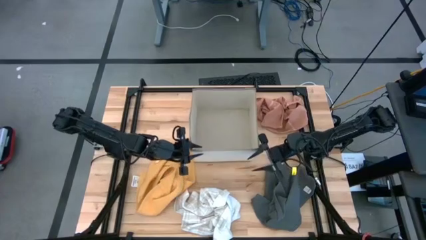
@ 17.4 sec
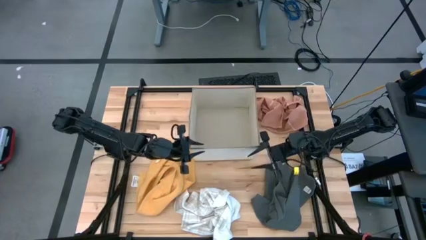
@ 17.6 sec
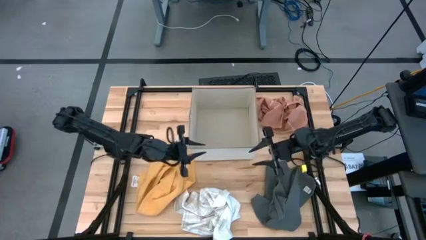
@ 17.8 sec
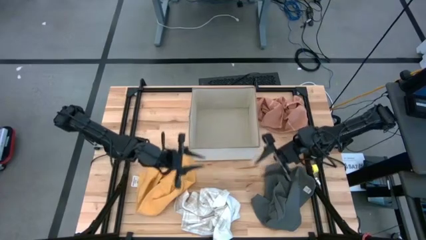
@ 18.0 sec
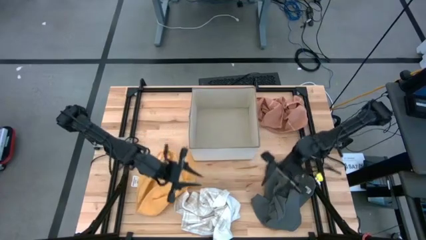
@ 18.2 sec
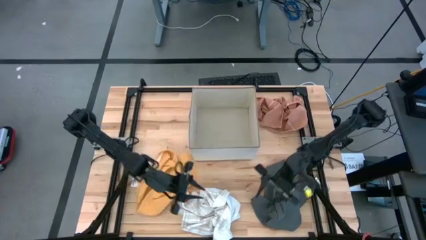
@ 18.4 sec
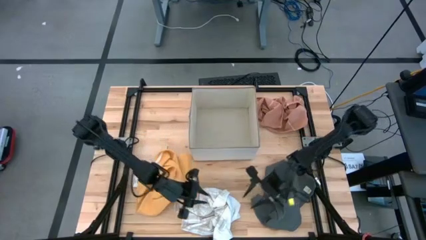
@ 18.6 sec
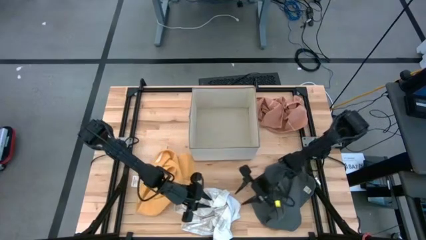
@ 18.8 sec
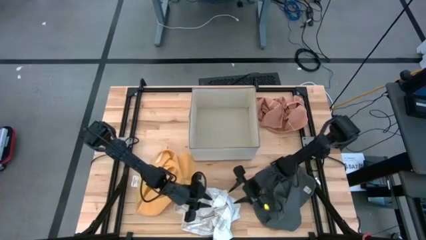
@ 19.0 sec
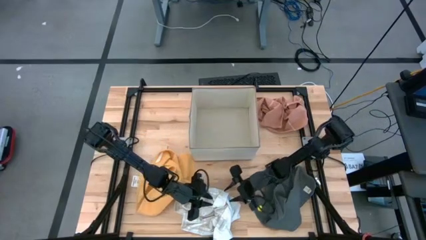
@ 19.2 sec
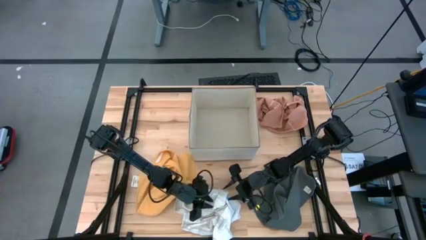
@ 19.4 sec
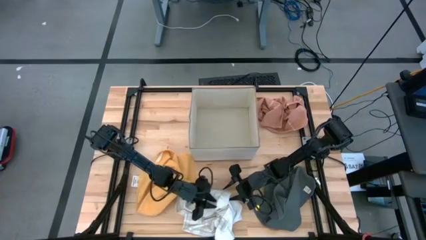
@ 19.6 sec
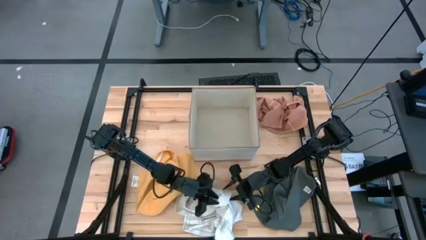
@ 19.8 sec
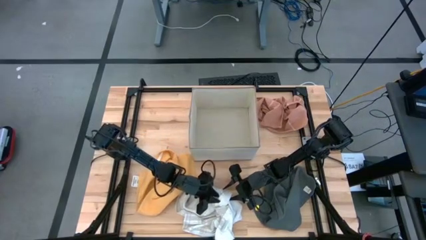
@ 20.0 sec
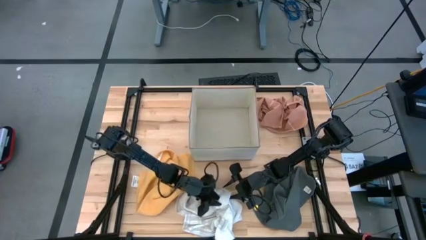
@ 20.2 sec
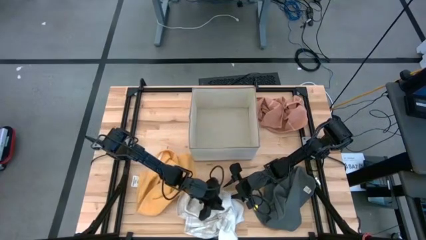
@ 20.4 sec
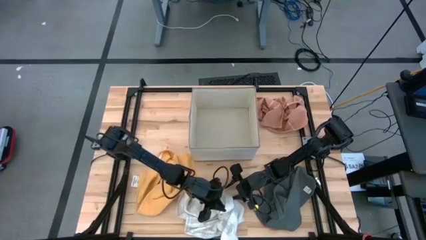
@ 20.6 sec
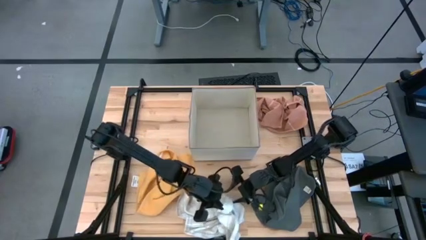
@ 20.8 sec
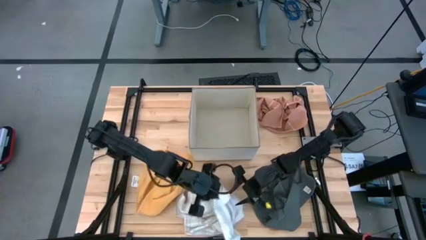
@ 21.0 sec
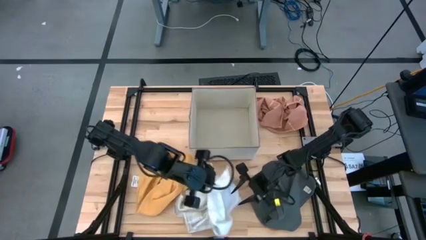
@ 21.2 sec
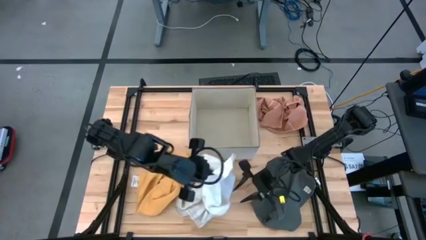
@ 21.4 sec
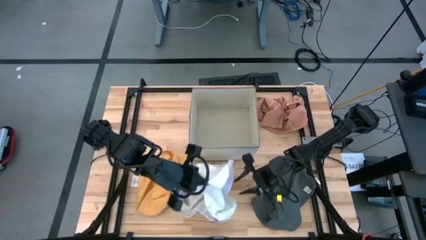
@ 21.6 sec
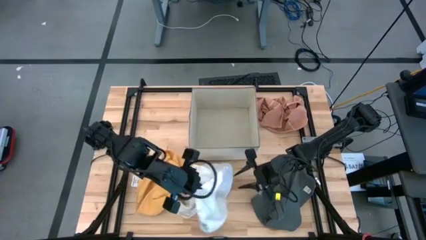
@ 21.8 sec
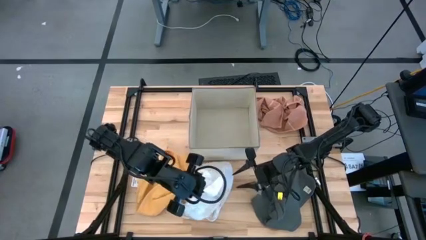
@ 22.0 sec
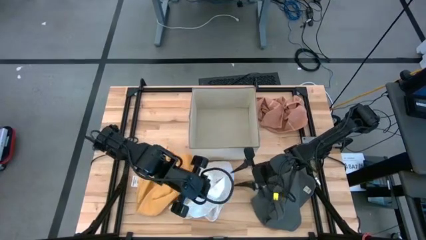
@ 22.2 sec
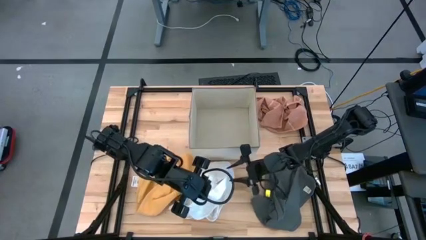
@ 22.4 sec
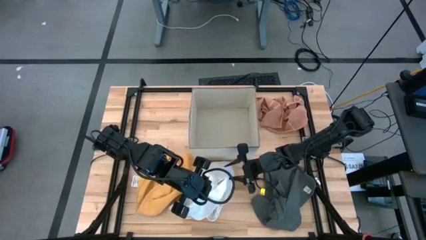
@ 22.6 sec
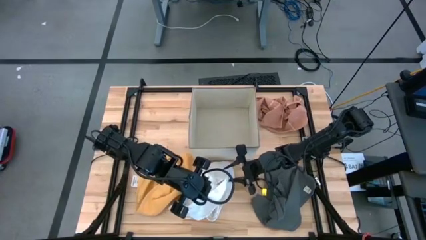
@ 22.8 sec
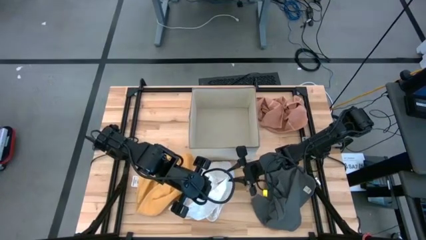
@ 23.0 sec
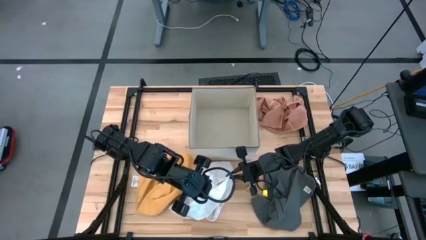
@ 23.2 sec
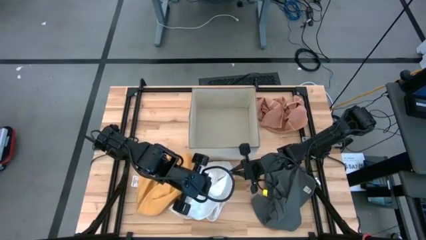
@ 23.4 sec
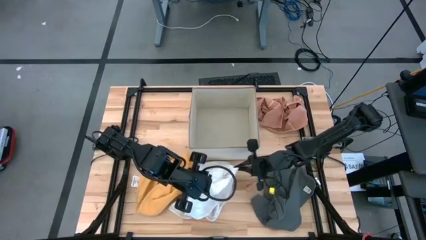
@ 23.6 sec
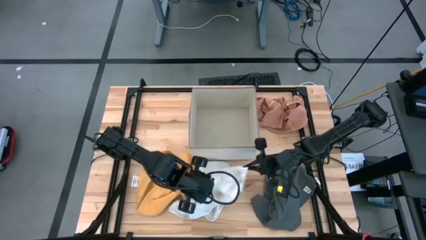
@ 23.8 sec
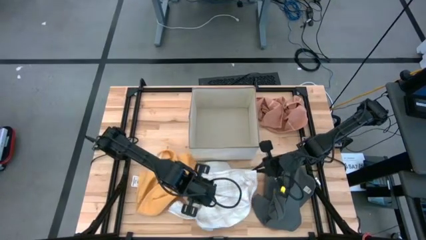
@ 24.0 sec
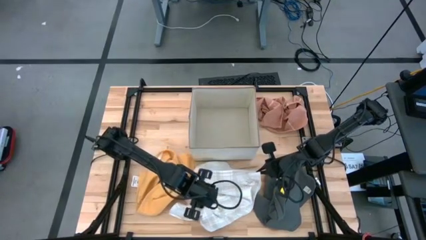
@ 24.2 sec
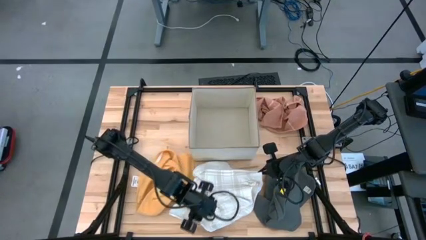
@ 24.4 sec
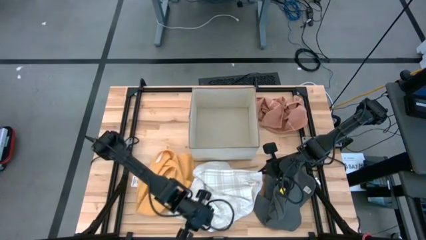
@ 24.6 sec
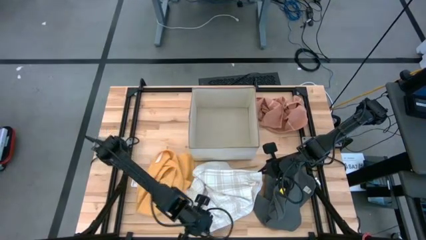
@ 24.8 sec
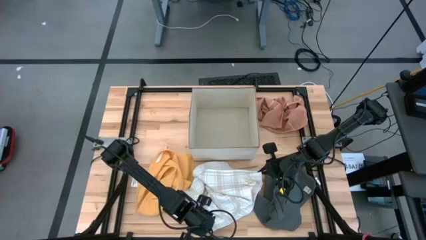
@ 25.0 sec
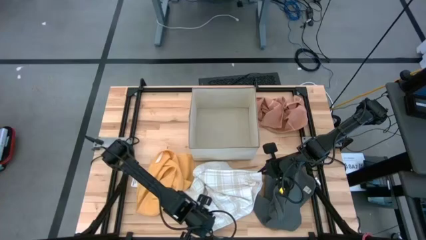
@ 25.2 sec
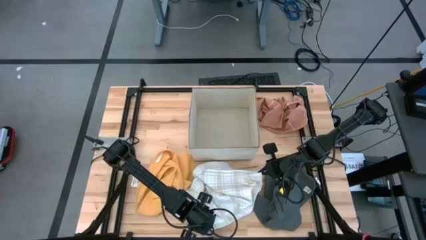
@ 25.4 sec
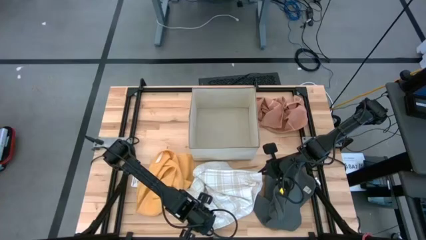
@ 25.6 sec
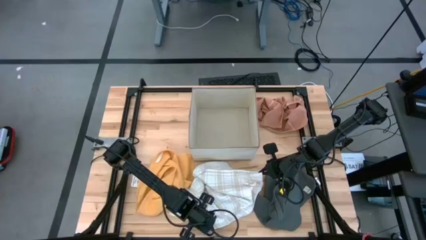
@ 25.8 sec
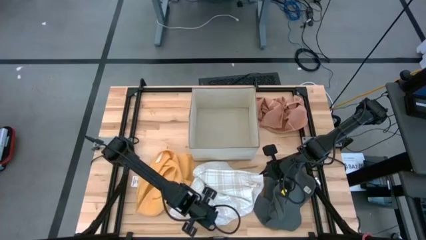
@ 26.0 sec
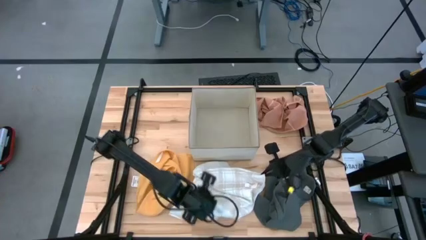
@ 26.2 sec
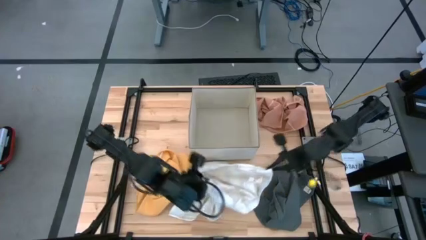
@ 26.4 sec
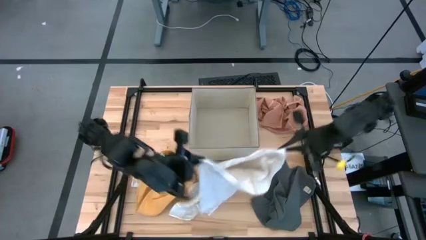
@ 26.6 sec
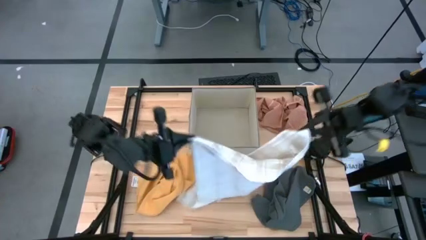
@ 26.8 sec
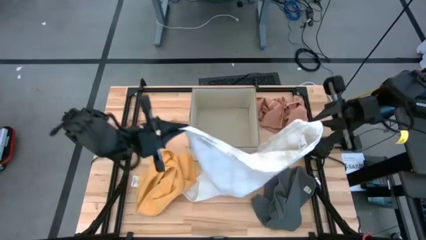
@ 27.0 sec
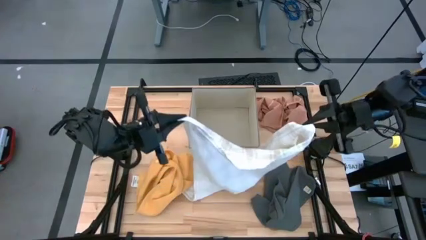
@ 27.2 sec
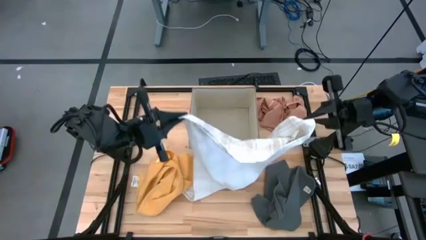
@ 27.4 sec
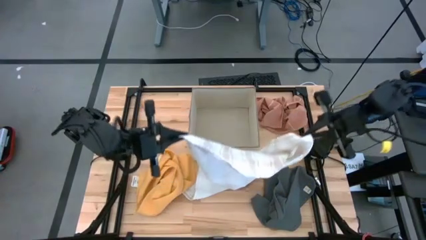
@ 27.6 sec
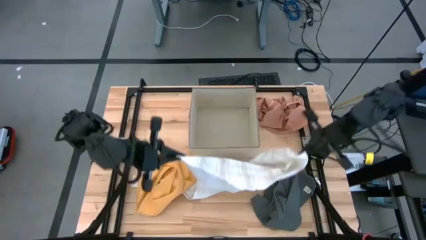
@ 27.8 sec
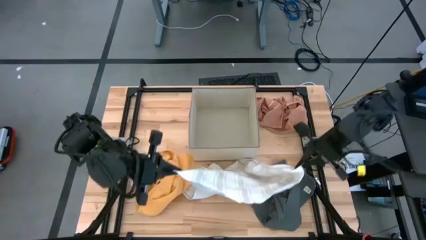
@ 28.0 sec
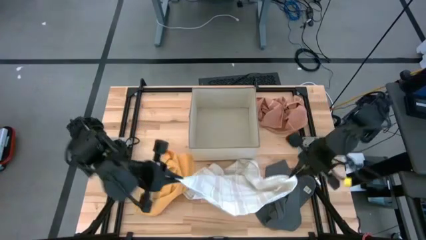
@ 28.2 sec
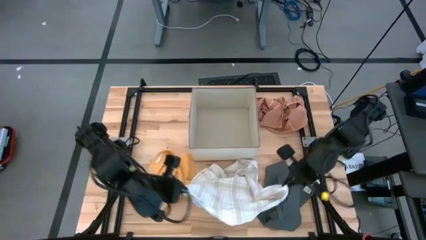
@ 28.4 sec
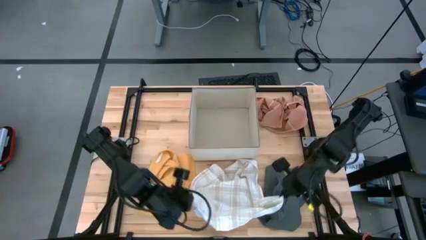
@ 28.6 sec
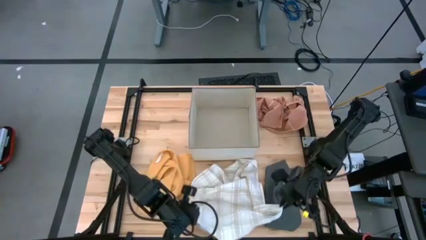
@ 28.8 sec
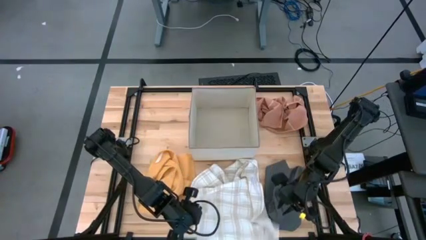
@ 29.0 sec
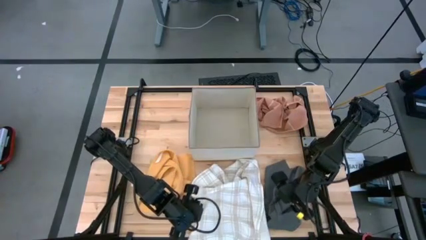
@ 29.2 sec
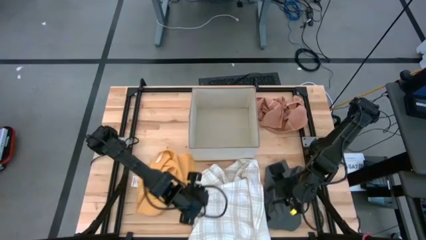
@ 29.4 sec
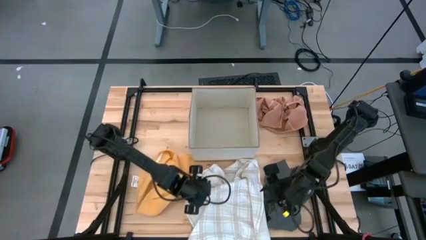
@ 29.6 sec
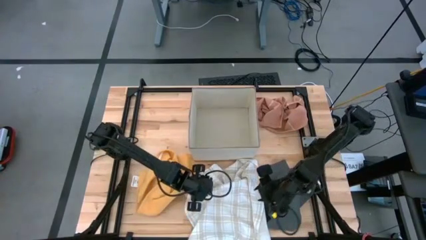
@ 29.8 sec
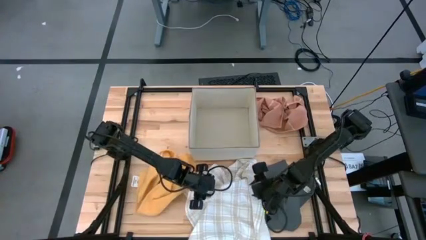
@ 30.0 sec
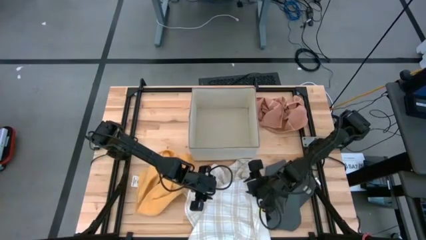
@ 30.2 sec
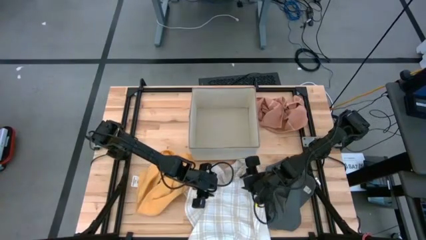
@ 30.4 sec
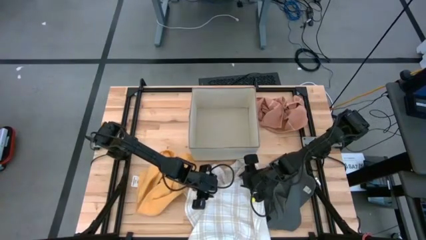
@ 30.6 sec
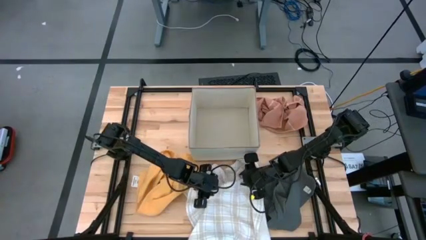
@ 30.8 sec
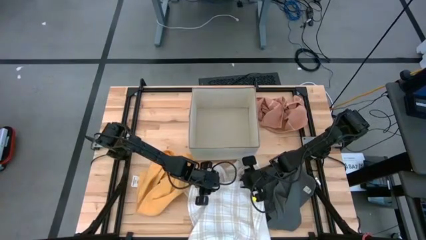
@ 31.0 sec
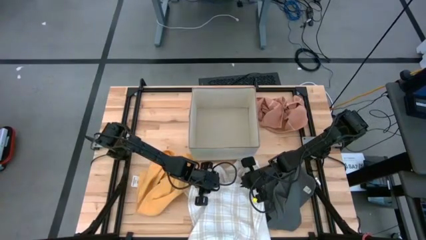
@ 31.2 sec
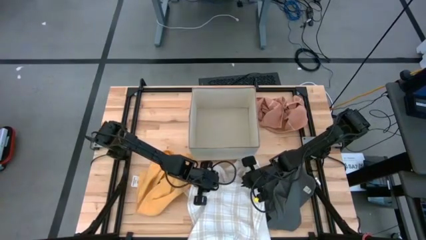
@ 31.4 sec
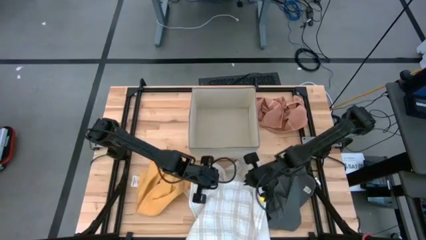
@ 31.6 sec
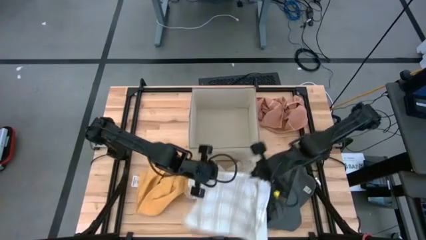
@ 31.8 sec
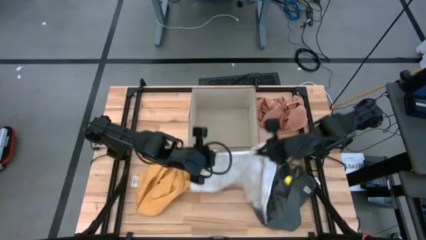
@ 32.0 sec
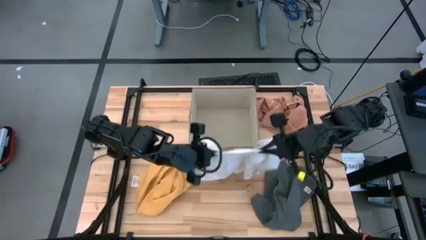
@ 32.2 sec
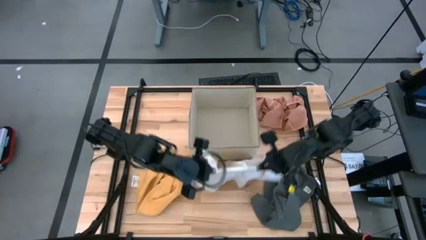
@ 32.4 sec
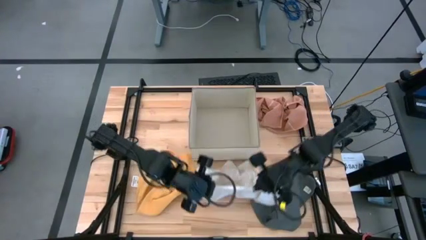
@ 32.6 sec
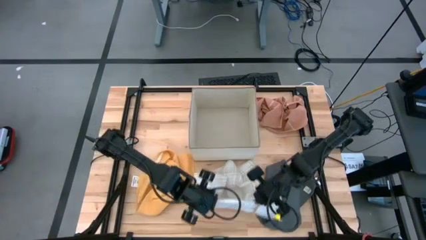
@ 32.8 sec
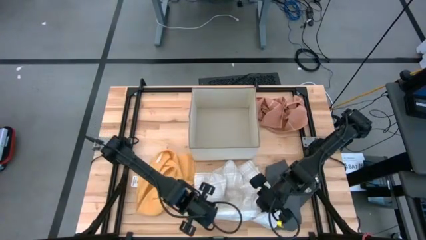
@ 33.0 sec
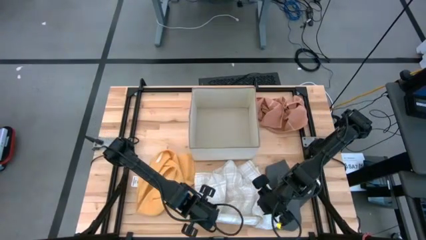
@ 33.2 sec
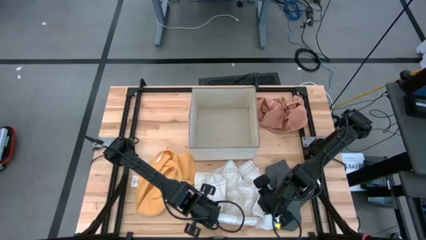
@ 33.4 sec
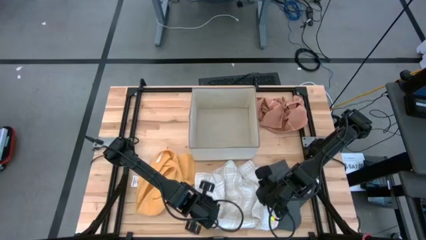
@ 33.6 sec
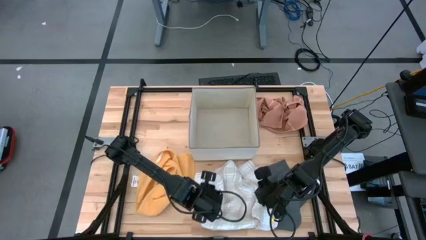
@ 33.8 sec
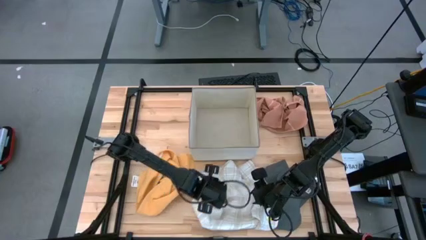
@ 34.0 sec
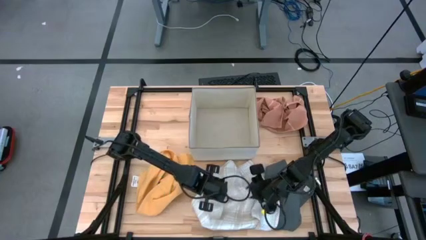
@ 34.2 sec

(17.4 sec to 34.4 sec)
Task: Fold towel
Fold the white towel with brown checkered lines
